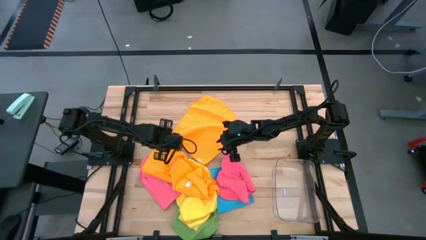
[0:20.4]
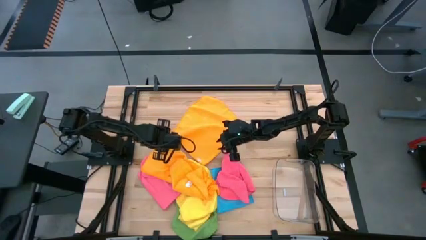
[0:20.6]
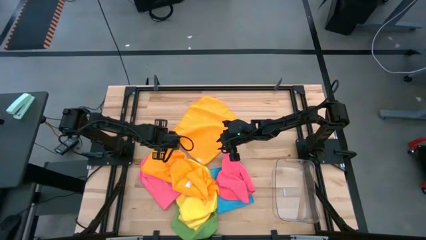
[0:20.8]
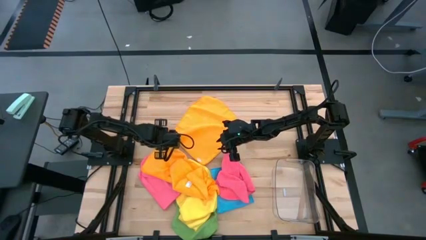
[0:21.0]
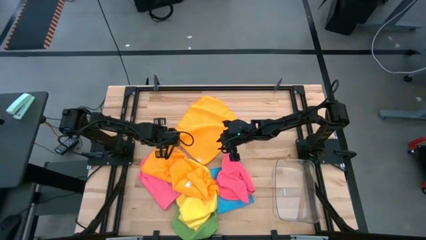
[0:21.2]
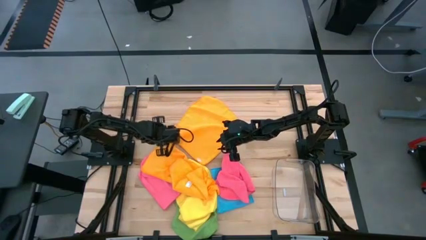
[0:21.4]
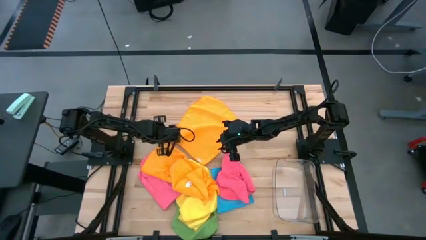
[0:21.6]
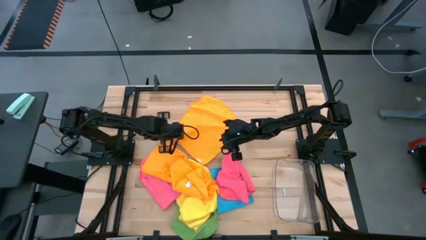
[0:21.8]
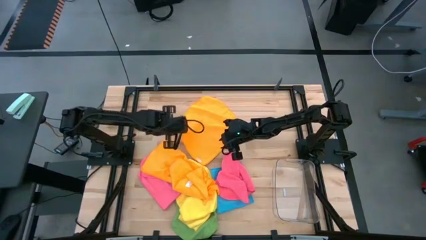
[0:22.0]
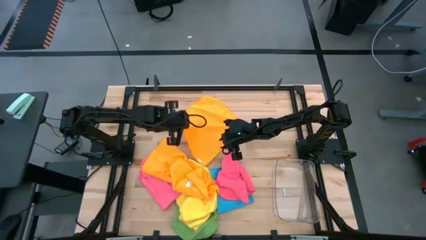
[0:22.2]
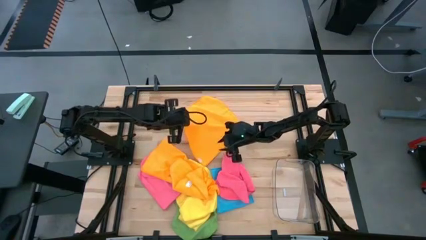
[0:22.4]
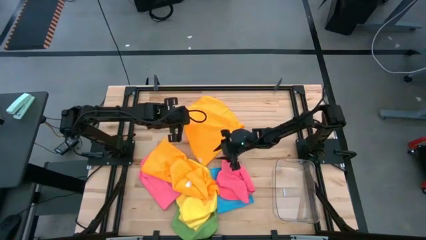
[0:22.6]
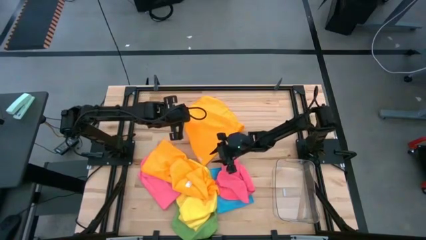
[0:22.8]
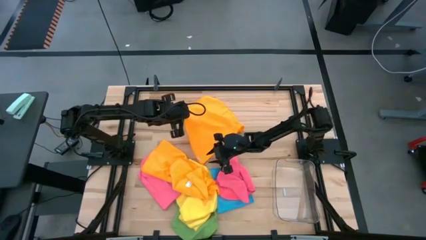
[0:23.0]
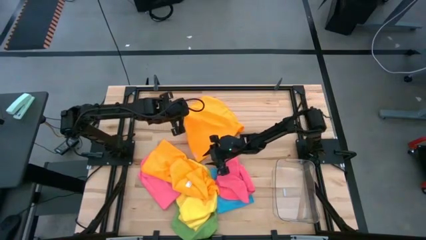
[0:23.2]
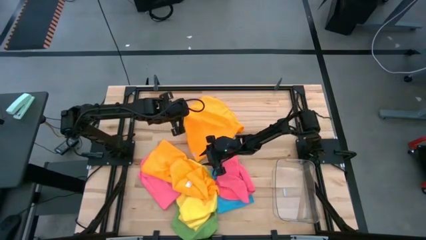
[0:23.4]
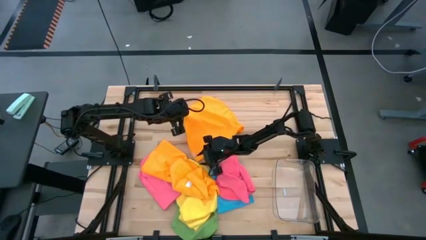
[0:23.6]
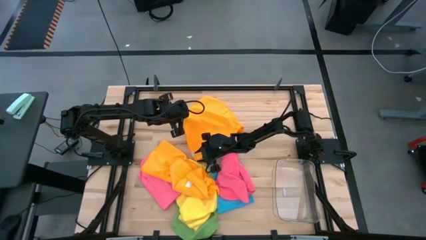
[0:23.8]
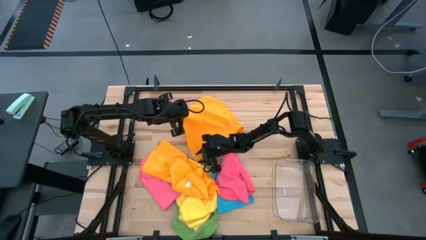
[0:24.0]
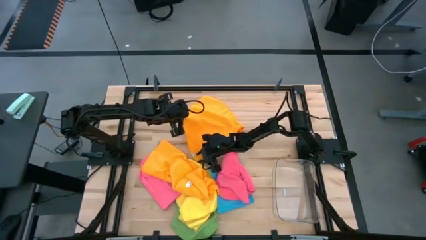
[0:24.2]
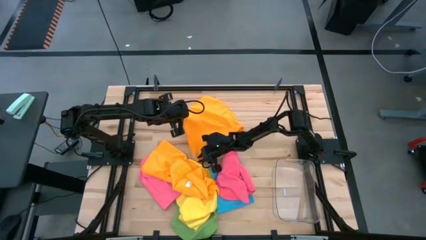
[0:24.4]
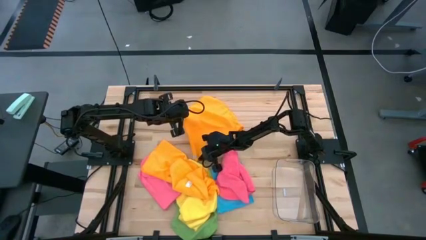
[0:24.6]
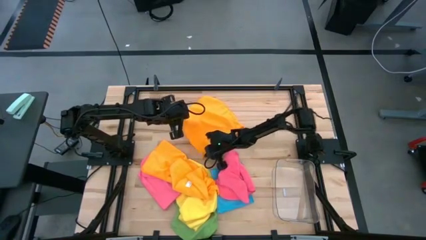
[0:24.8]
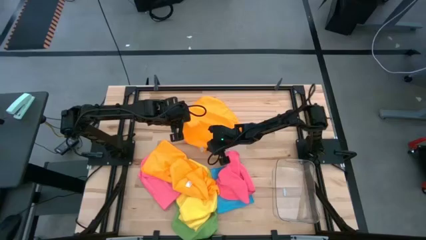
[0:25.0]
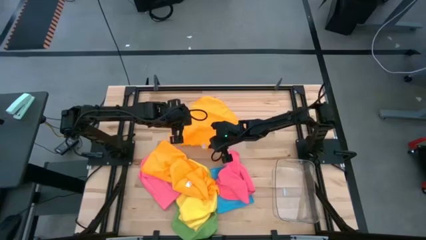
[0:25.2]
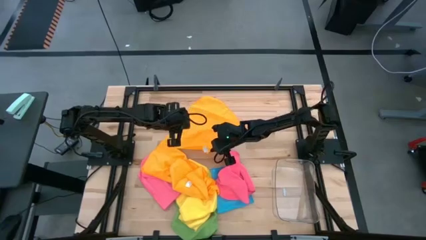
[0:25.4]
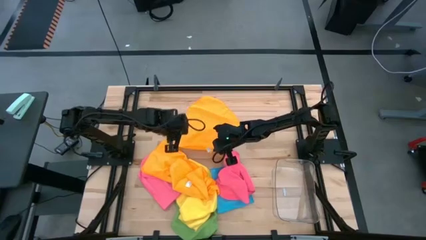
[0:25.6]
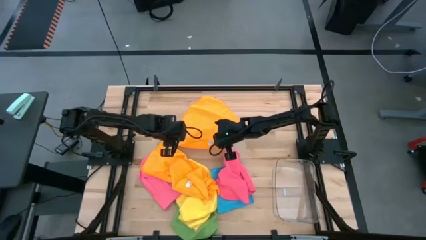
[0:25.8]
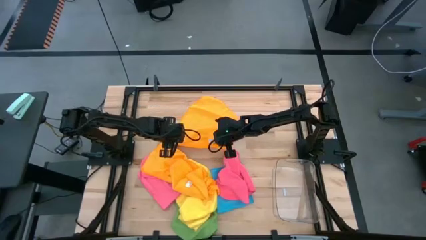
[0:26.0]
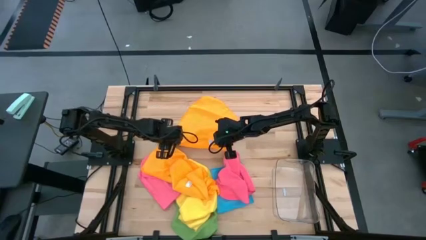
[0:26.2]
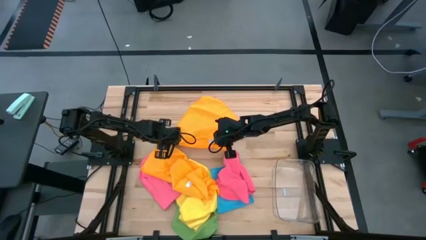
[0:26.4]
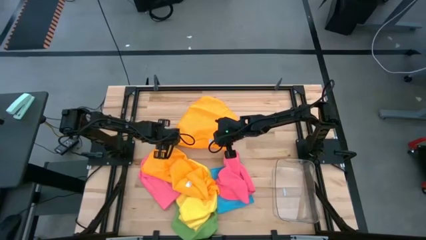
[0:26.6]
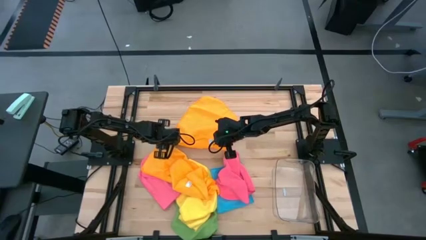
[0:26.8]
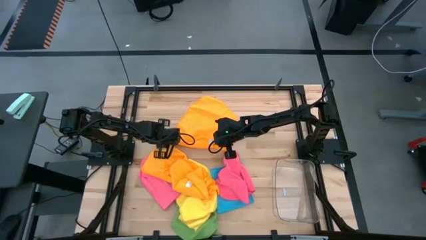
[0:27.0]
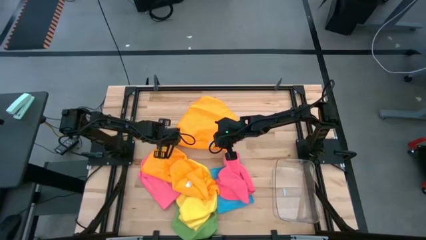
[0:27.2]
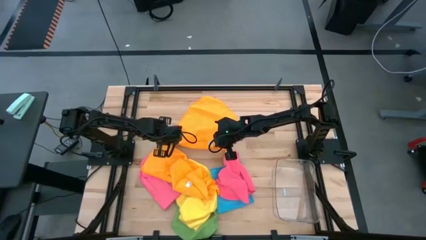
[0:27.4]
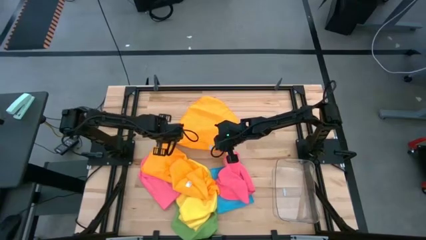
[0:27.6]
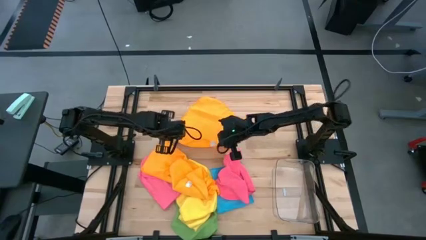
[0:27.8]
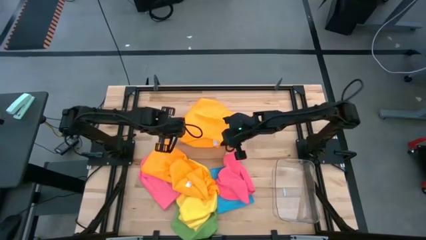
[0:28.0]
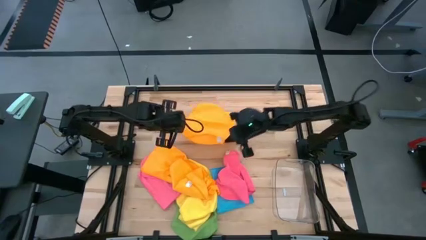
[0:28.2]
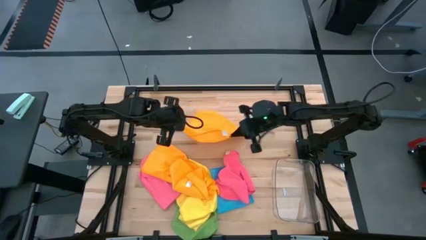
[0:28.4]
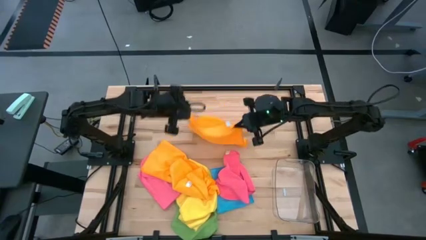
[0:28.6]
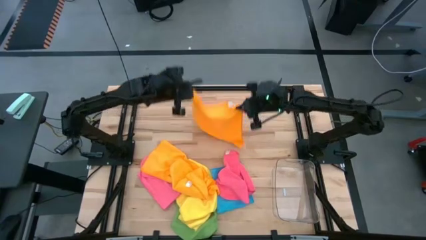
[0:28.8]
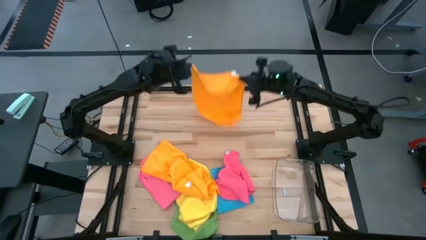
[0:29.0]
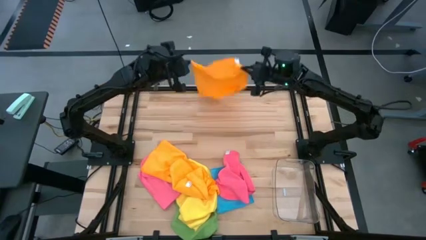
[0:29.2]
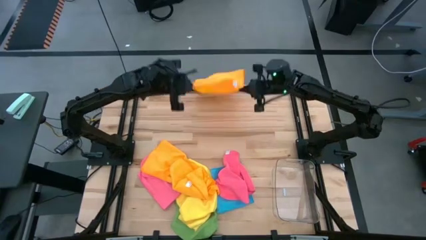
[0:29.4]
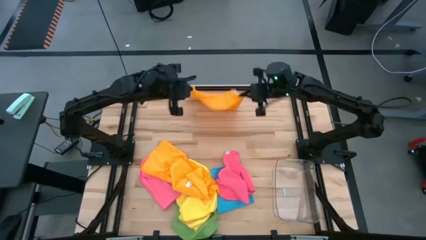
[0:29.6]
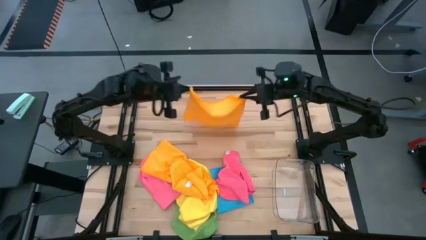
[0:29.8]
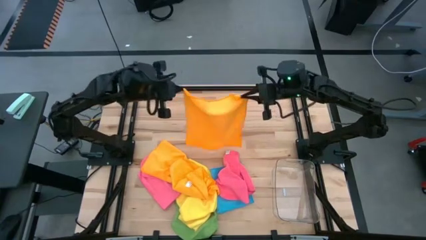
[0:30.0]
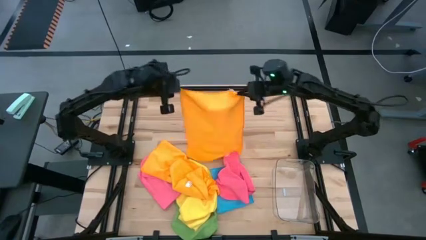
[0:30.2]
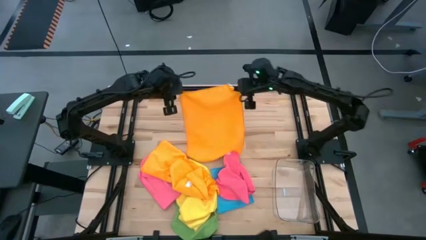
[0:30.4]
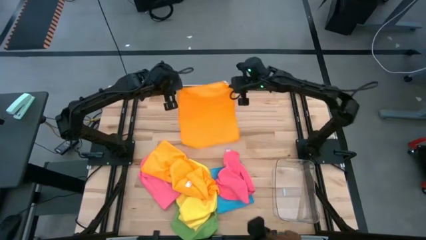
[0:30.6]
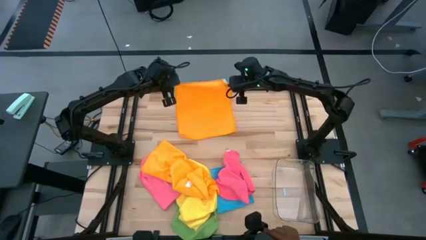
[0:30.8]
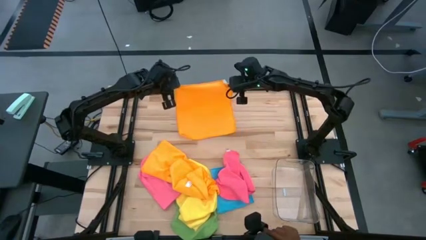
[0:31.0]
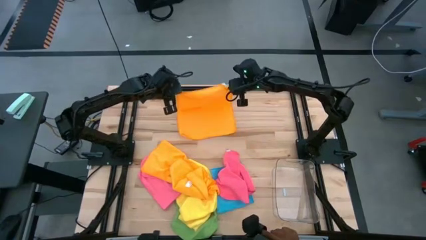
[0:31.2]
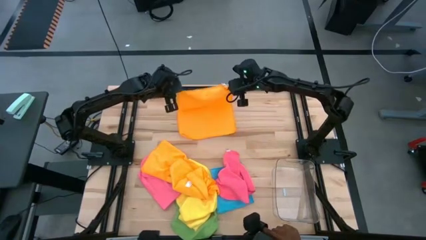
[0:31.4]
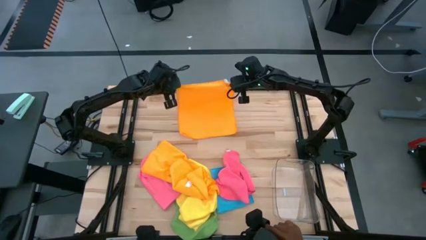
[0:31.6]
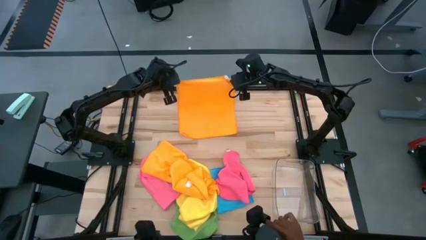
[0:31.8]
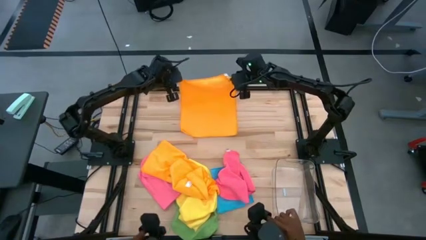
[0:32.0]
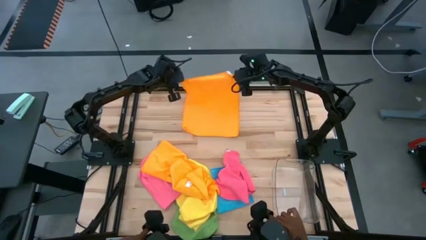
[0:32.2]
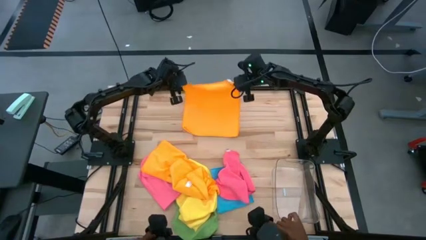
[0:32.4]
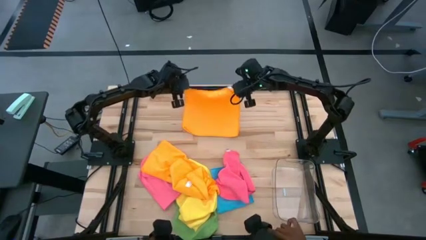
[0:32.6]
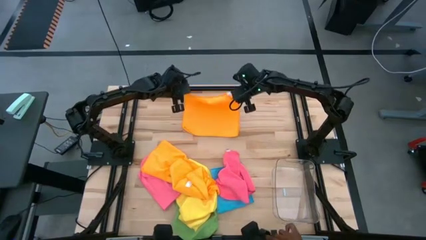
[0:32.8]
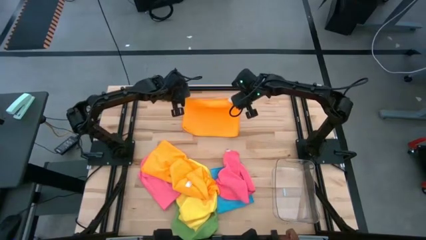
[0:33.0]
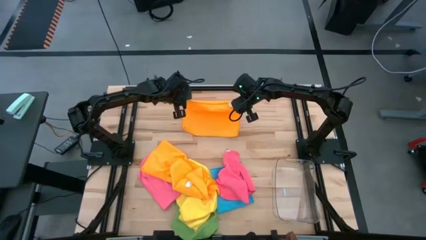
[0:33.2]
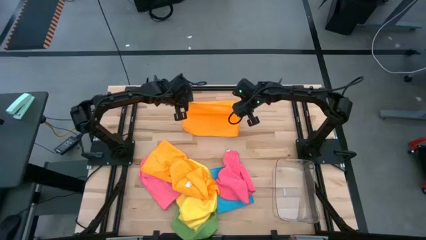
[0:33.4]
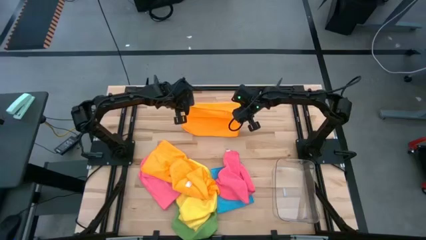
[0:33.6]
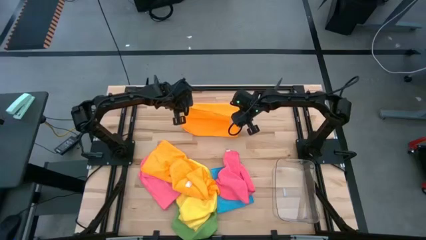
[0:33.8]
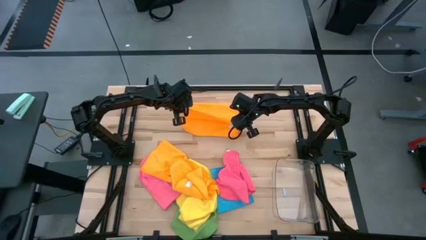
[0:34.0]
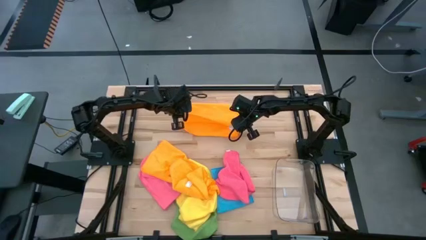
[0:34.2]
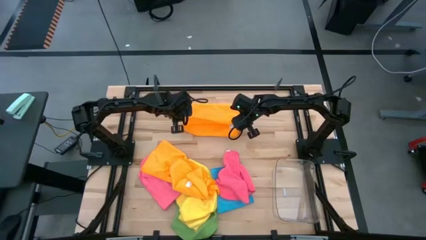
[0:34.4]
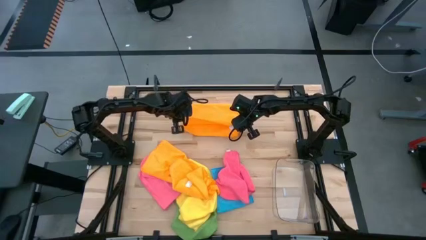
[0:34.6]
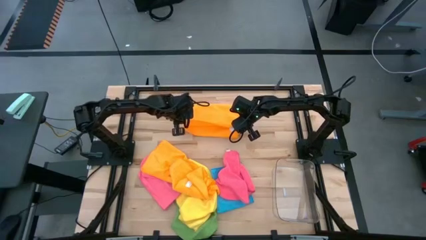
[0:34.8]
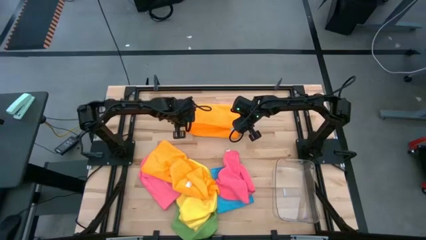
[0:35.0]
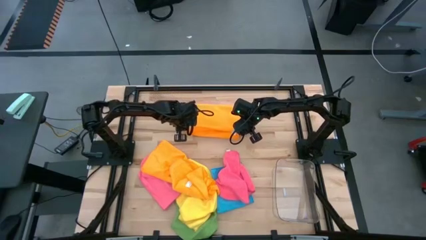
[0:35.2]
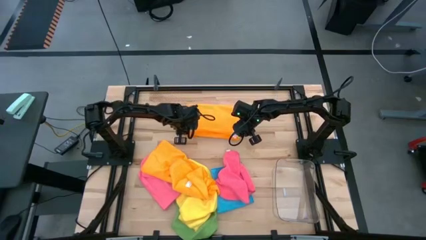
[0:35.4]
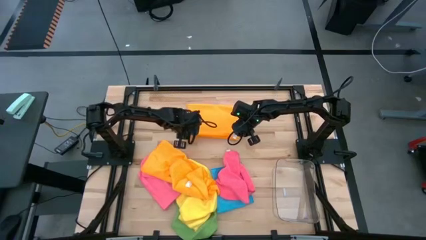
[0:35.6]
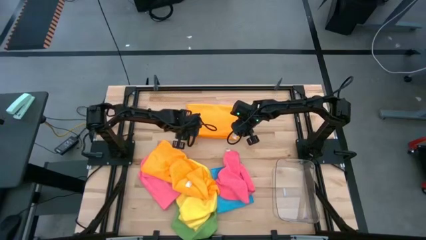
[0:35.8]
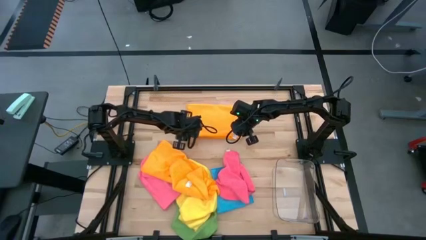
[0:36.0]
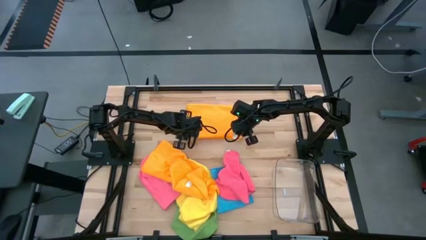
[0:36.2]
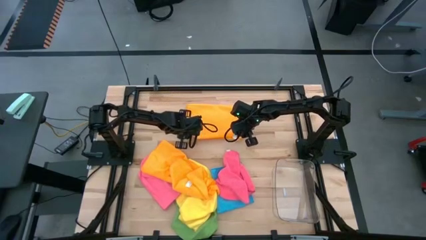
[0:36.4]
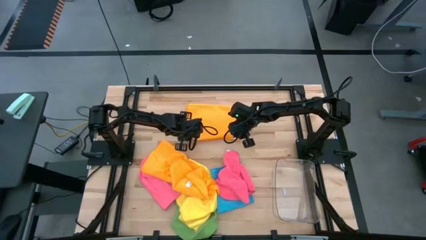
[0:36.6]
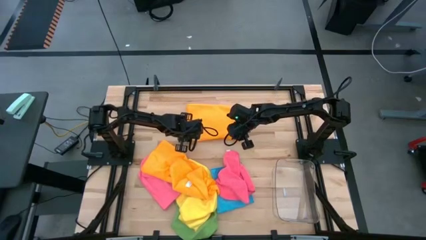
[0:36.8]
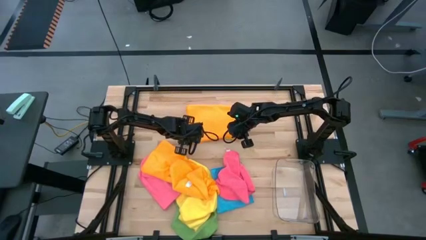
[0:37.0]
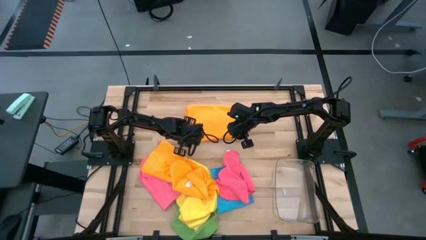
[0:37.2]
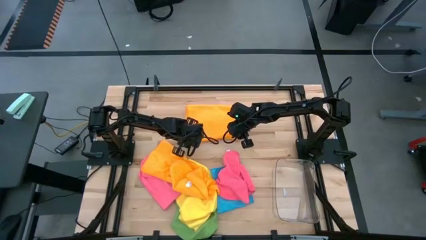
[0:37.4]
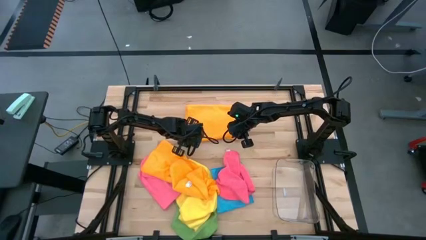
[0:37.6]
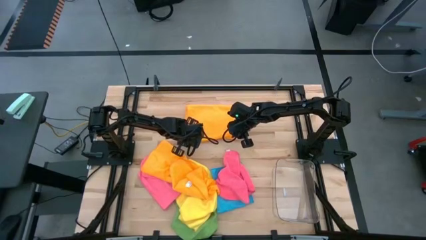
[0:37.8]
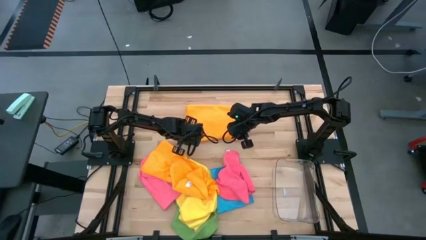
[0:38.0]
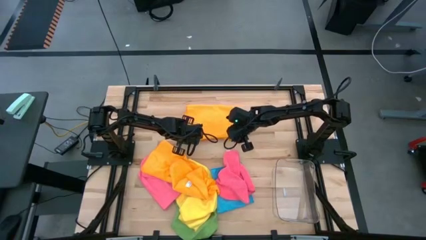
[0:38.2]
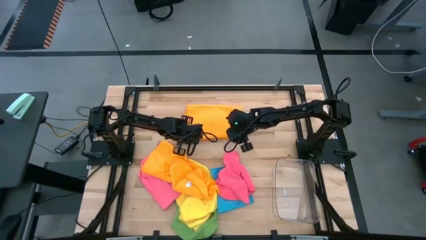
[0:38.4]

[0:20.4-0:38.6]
Task: Fold microfiber towels
Fold the orange towel
